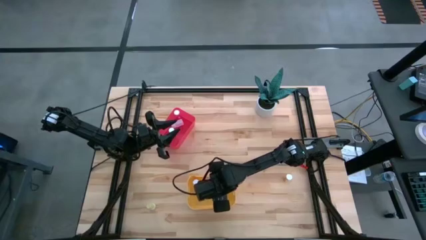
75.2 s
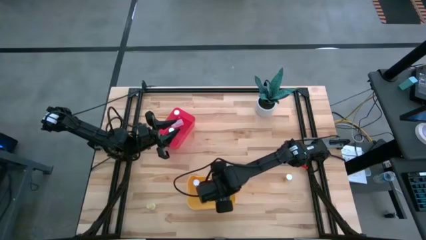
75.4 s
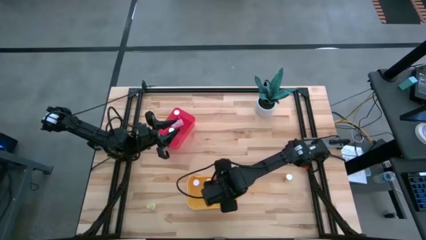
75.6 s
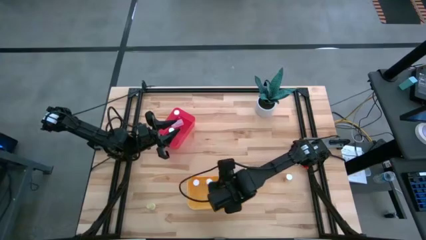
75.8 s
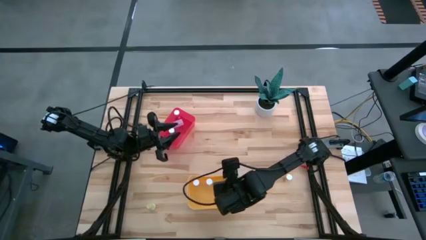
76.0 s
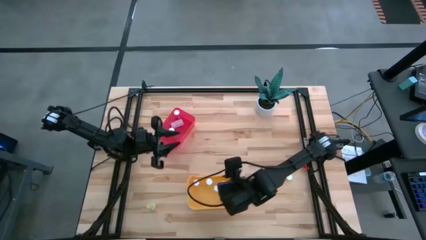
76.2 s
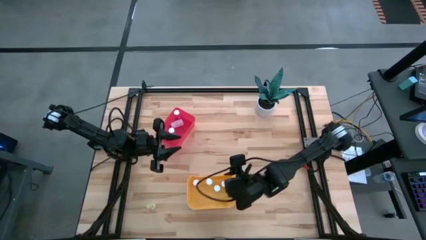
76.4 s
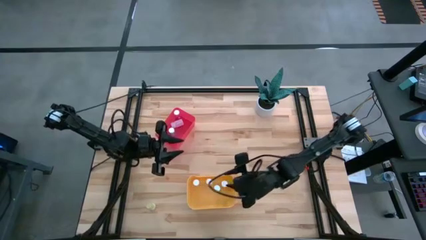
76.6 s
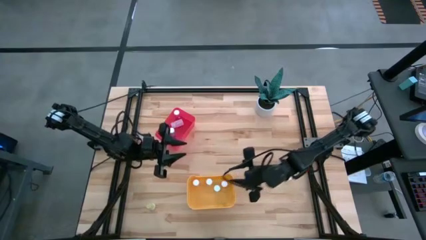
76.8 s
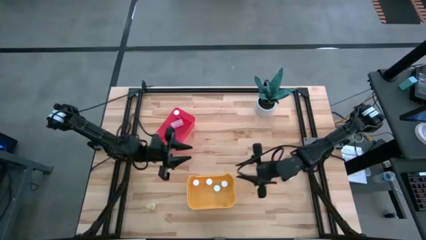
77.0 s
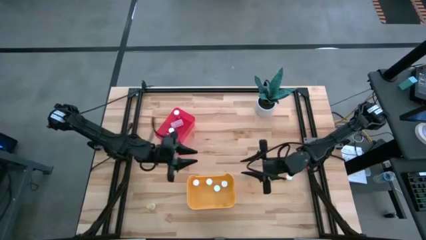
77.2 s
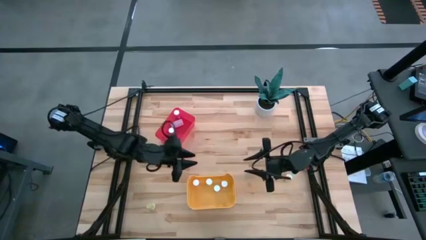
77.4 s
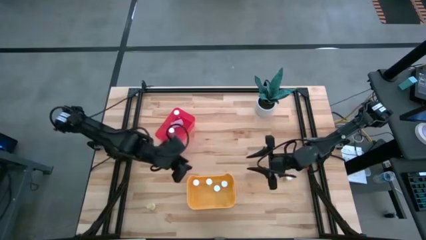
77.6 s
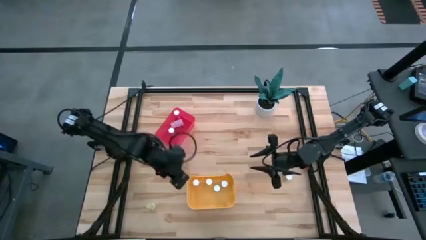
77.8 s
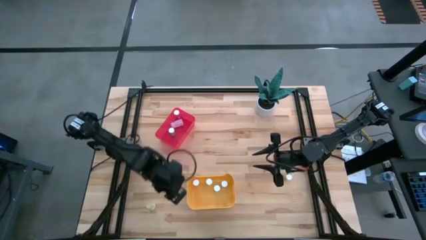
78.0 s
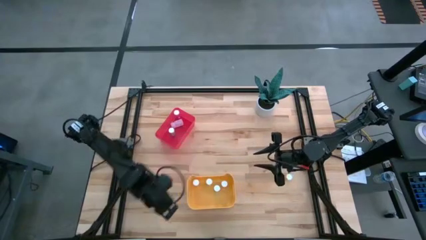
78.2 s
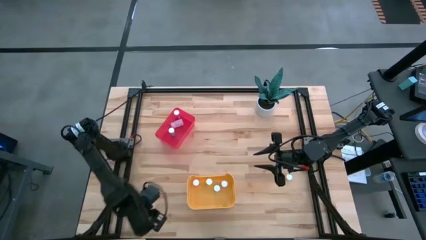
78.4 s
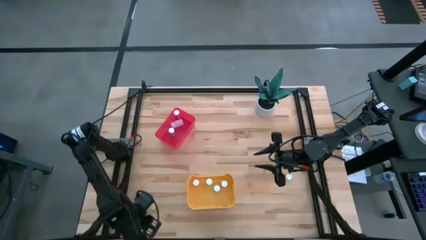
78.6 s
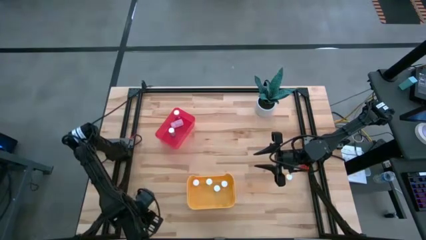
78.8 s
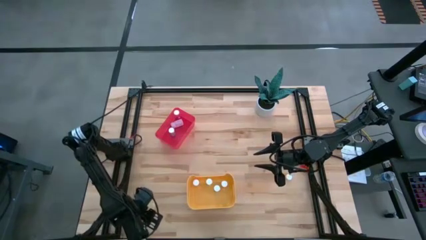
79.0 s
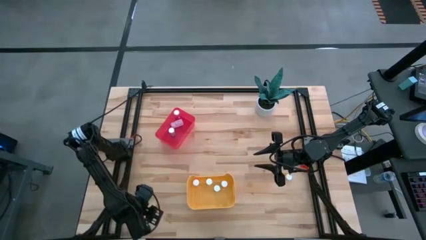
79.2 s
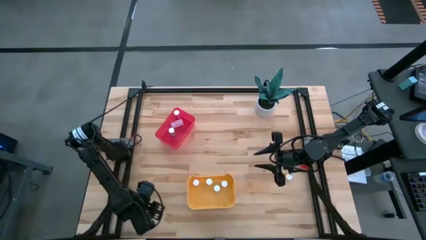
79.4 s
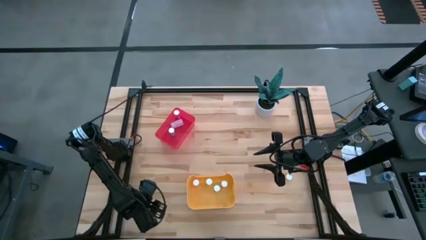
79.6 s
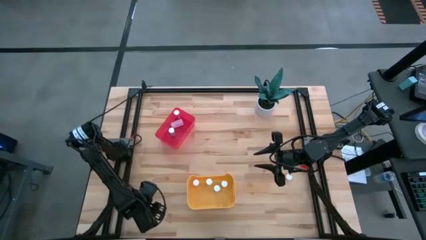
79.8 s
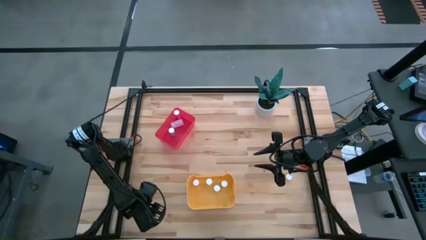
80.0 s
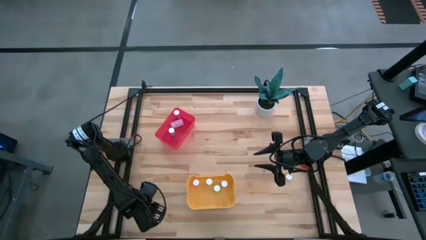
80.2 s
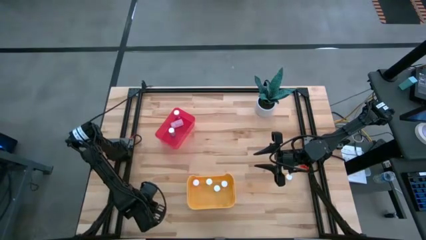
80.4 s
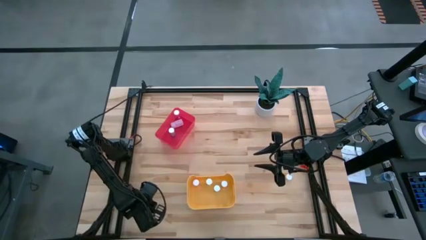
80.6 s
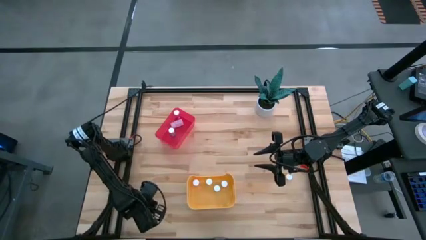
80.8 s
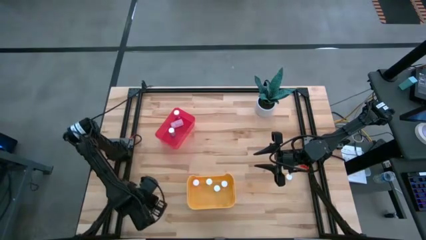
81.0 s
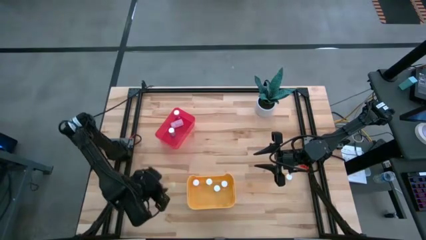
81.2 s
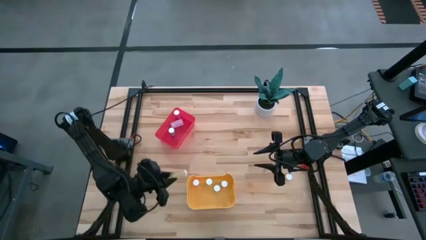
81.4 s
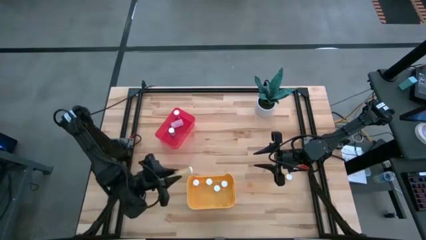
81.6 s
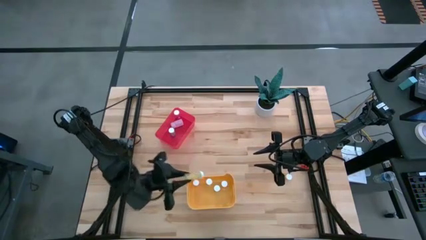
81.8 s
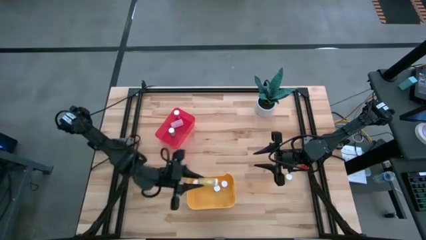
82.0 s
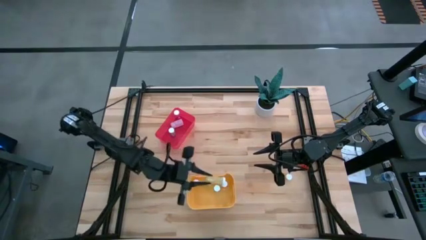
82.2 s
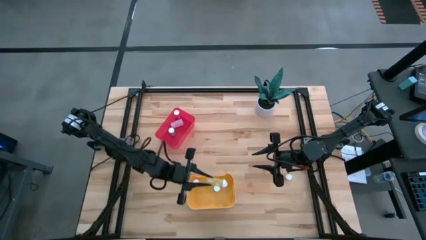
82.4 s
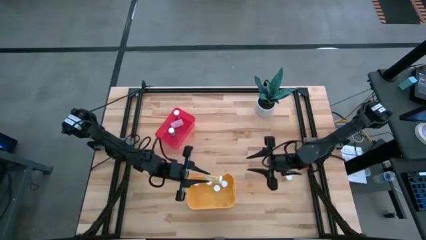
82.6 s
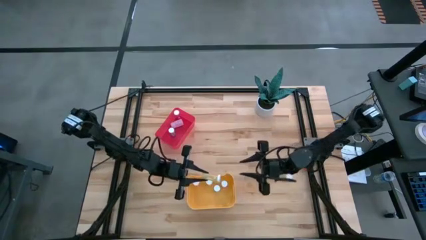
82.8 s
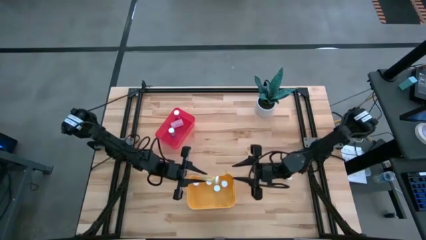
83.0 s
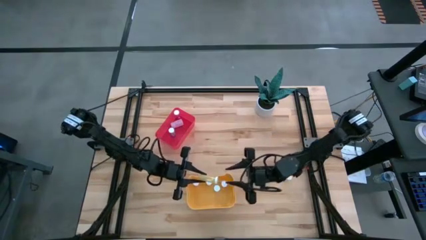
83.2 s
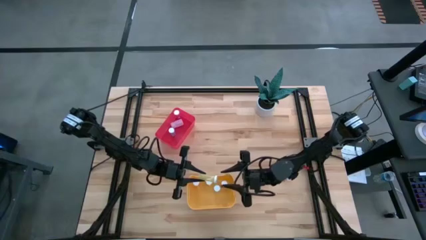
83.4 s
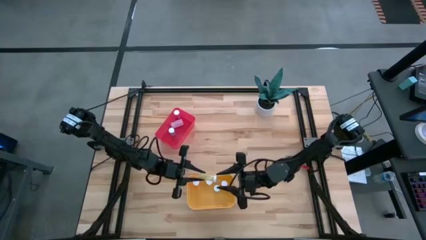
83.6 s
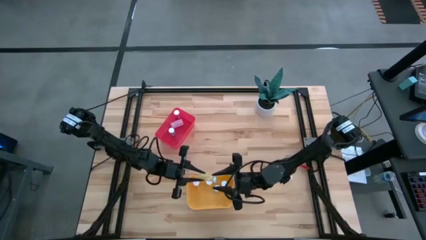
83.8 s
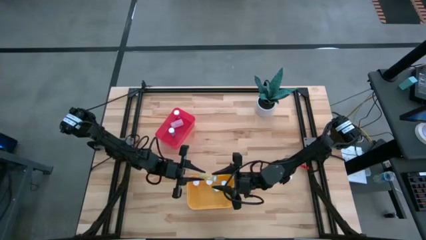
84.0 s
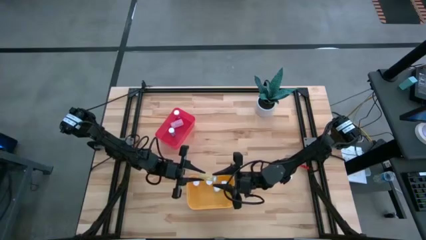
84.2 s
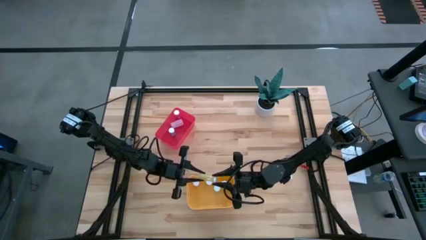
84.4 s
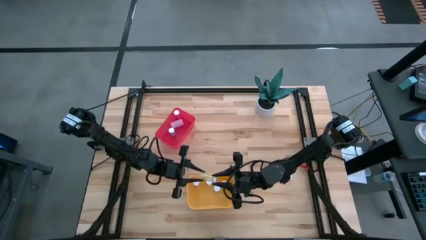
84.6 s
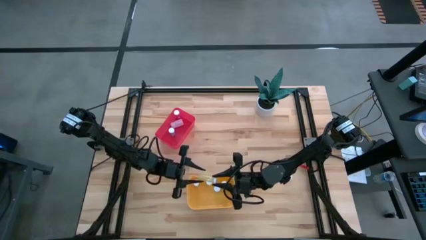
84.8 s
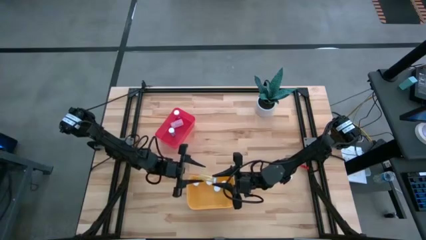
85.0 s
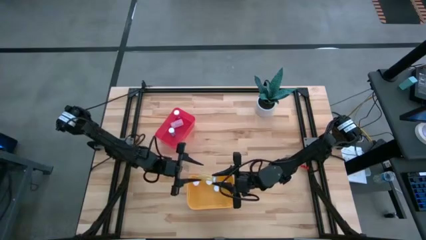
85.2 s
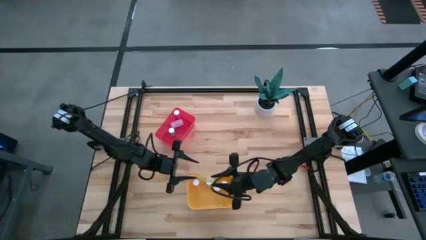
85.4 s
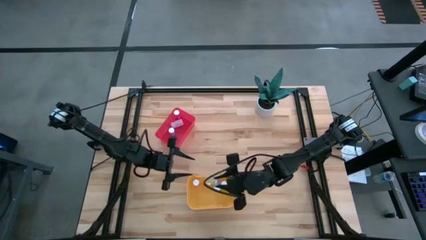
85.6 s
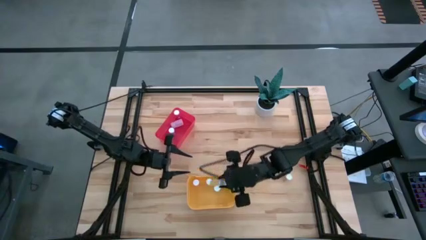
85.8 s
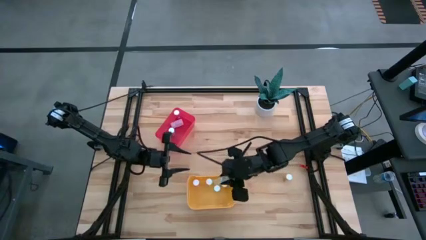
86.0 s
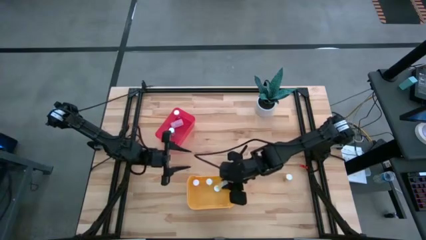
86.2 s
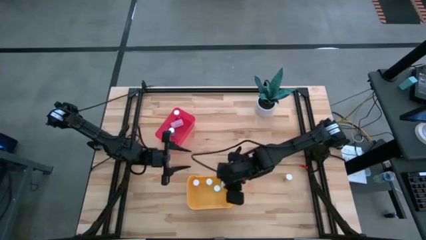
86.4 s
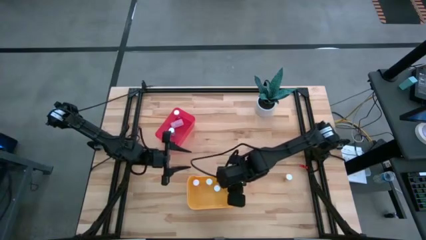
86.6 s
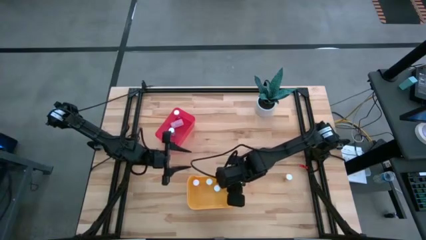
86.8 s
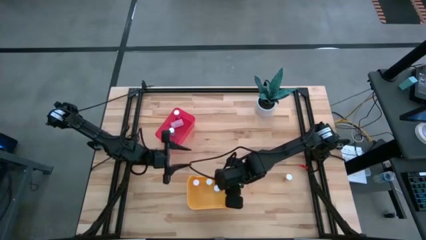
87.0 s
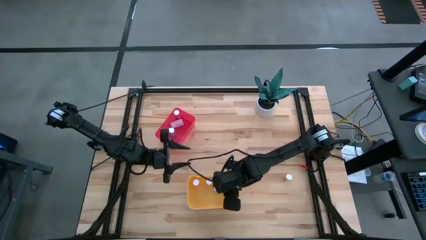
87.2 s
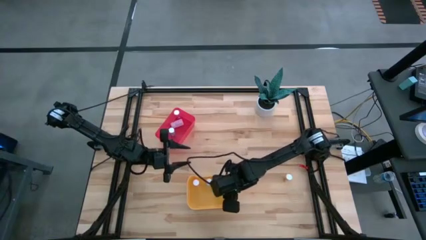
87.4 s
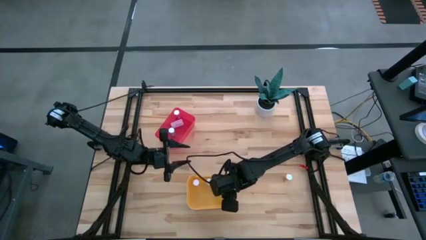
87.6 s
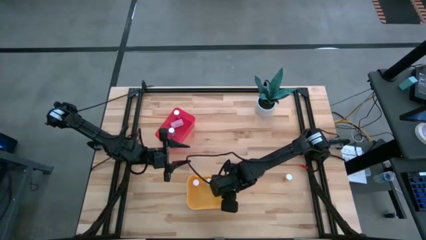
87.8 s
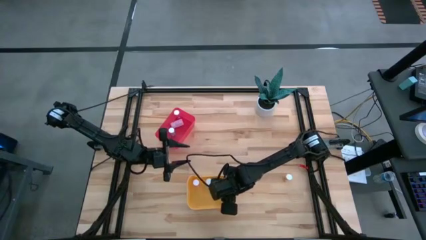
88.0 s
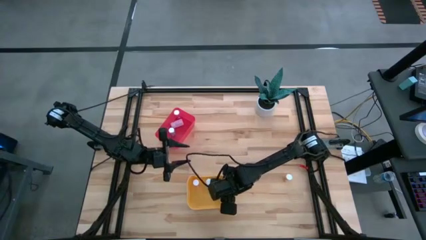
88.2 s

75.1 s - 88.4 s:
Task: Pick and place medicine bottles into bin by pill shape (circle, oval)
Put the yellow tablet bottle into the yellow bin

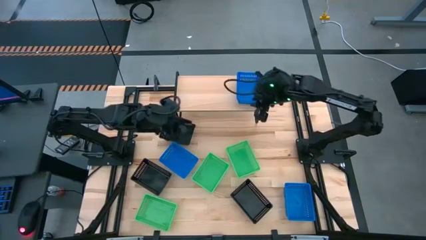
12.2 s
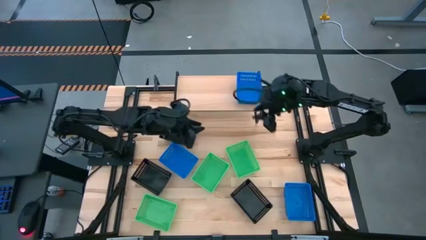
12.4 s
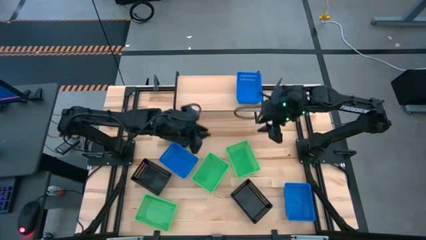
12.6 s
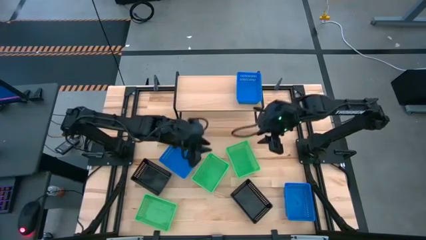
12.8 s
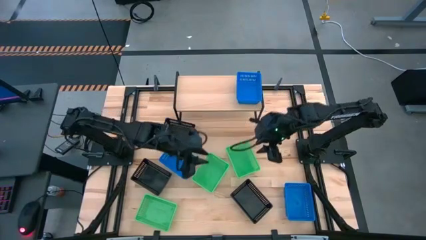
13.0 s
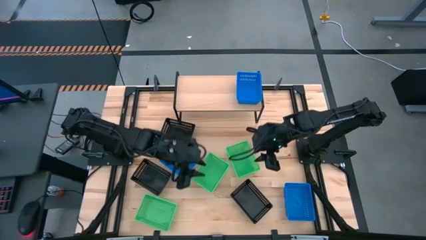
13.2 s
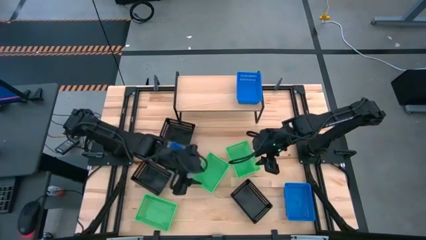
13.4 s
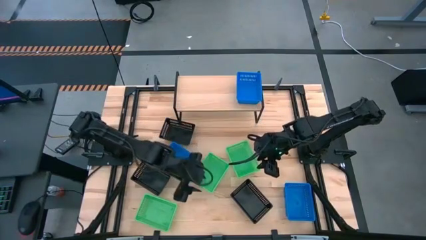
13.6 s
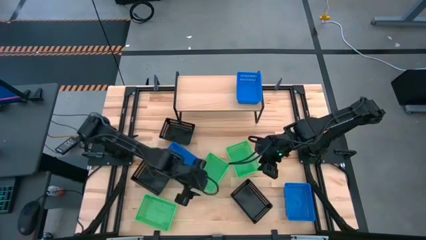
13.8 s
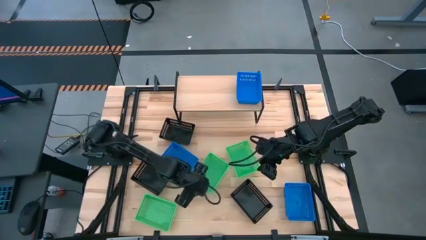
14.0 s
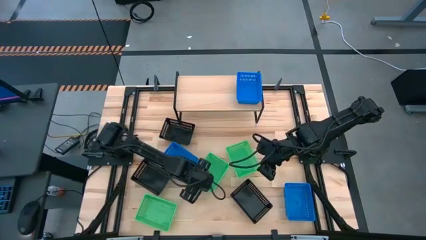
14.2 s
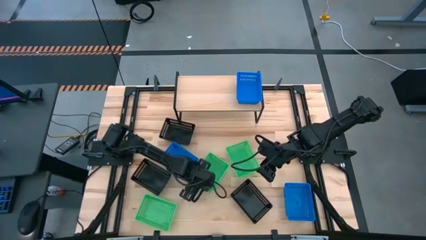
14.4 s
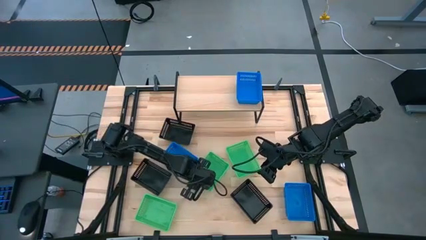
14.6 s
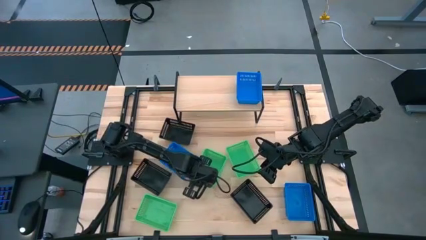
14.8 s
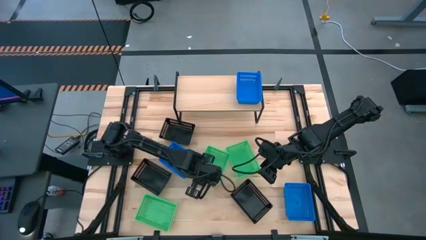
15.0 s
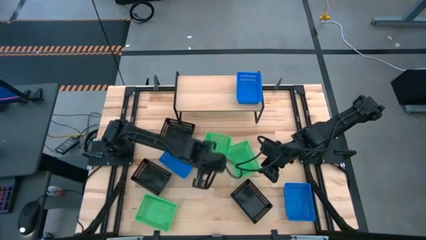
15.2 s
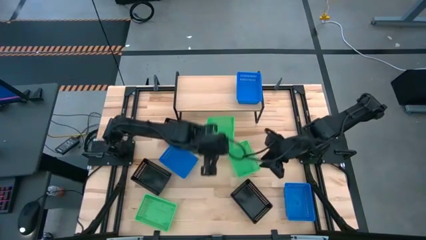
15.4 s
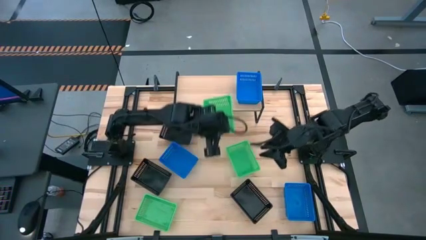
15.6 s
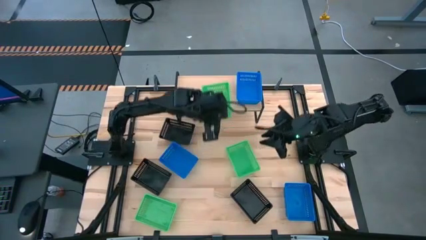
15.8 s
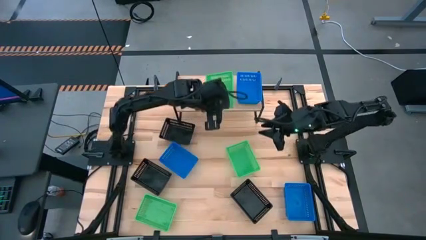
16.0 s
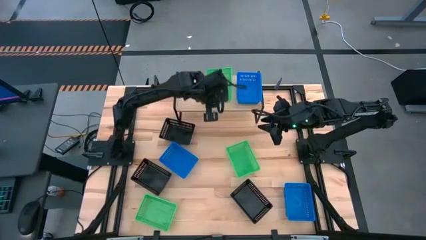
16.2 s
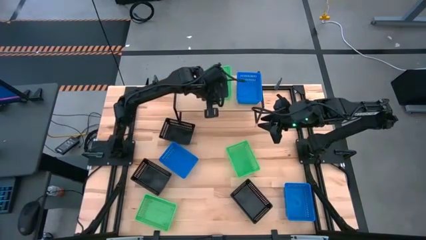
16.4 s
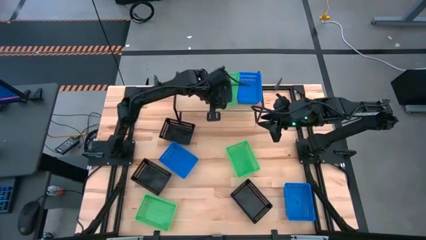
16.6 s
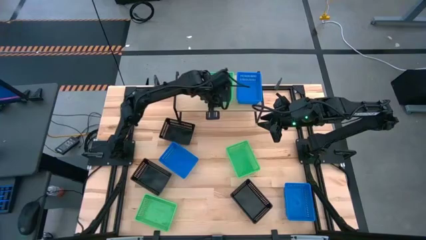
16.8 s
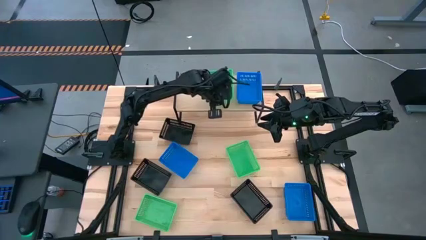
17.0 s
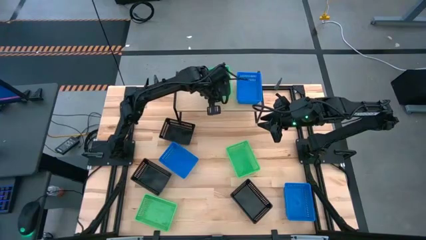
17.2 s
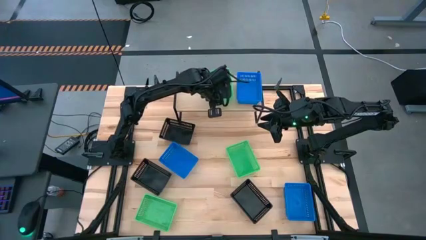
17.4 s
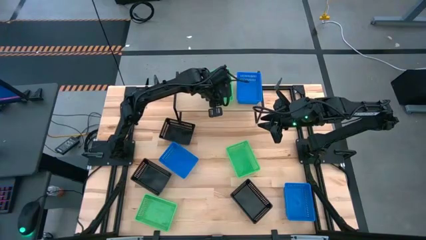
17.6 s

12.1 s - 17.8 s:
Task: Stack baskets on shelf by color
Put the top left green basket on the shelf
